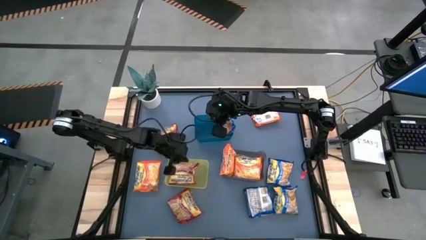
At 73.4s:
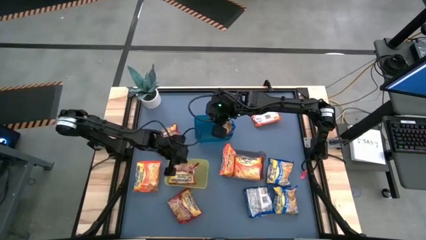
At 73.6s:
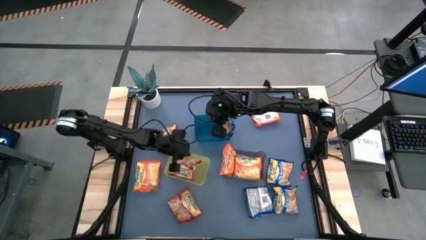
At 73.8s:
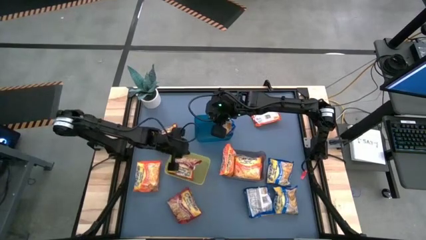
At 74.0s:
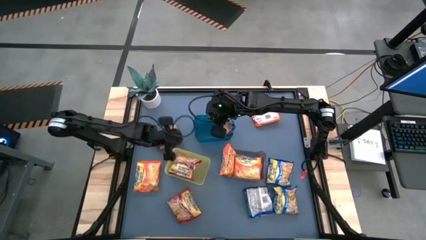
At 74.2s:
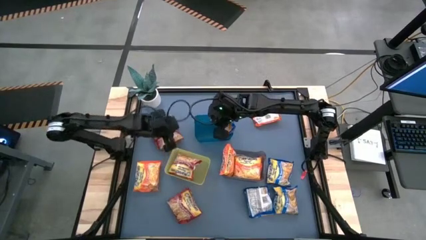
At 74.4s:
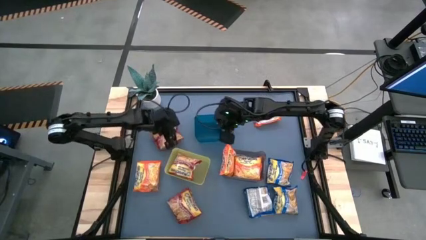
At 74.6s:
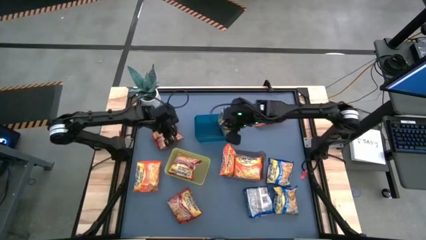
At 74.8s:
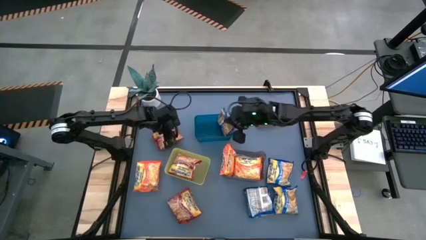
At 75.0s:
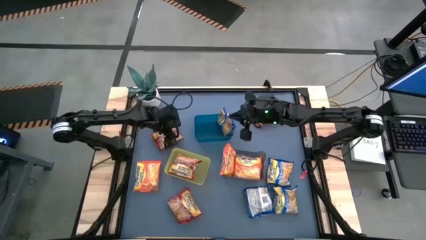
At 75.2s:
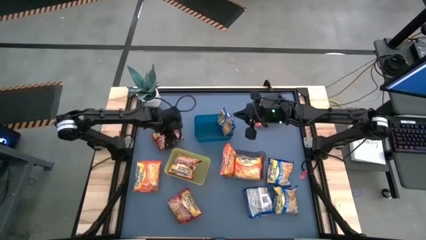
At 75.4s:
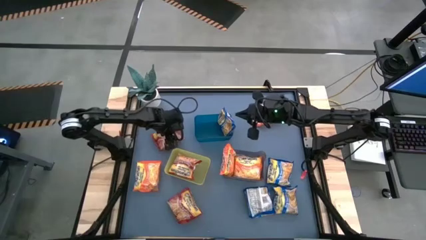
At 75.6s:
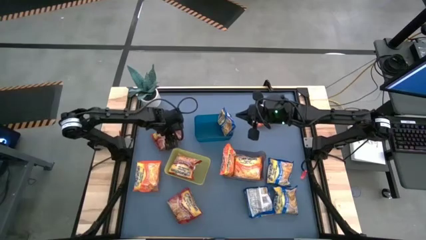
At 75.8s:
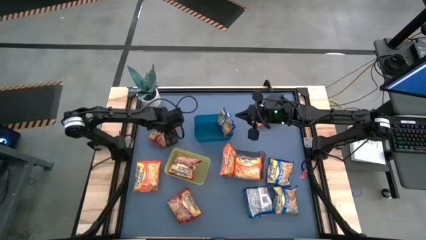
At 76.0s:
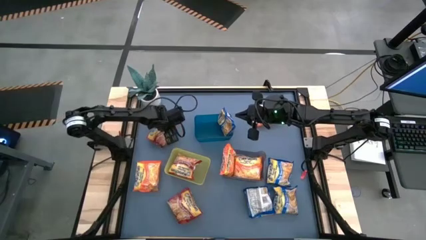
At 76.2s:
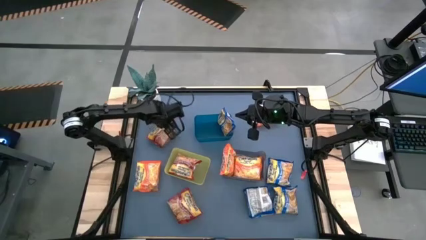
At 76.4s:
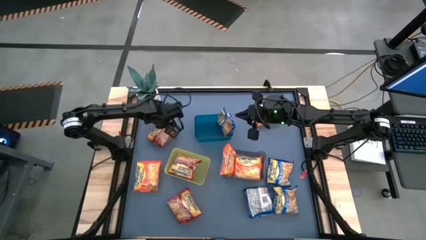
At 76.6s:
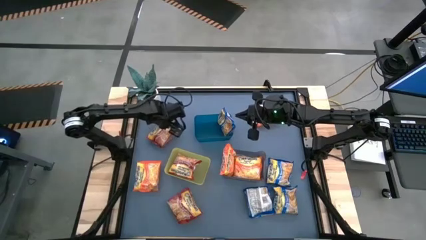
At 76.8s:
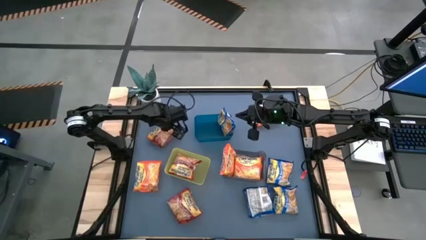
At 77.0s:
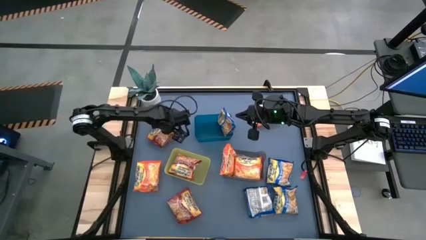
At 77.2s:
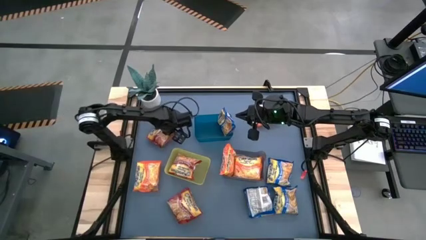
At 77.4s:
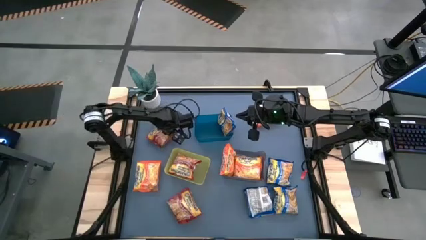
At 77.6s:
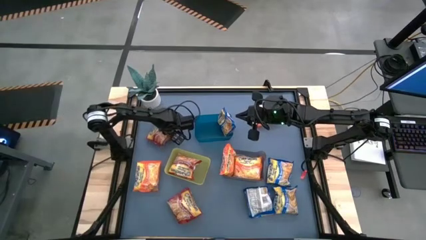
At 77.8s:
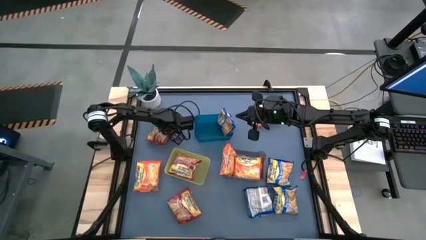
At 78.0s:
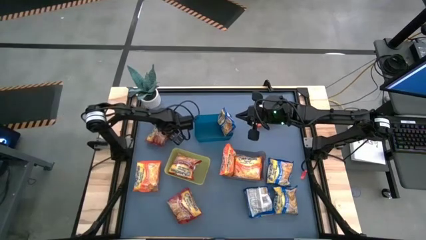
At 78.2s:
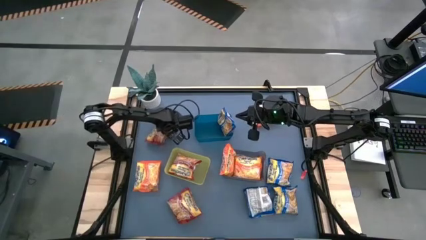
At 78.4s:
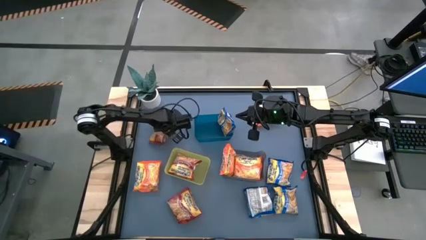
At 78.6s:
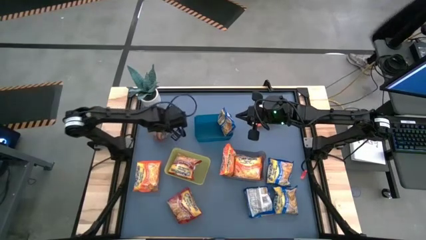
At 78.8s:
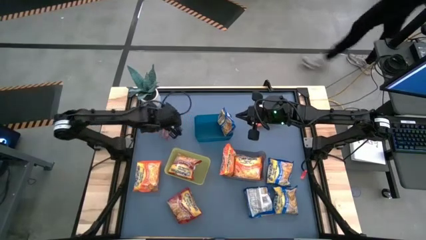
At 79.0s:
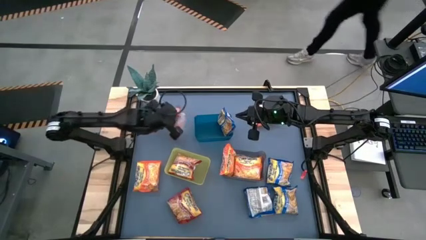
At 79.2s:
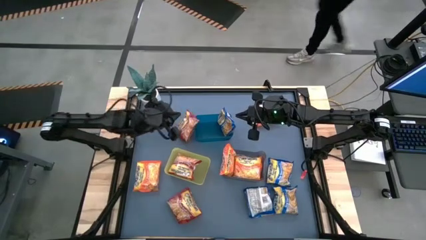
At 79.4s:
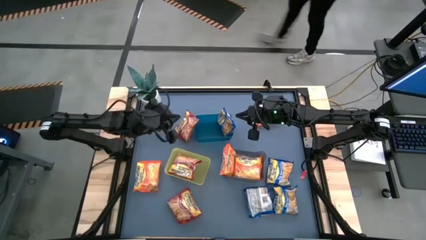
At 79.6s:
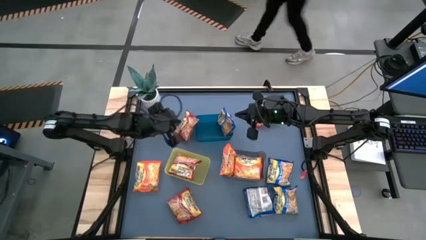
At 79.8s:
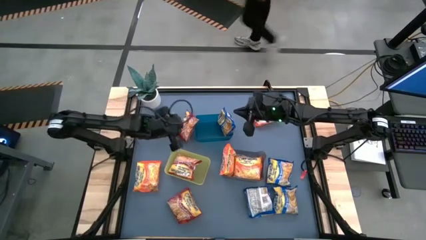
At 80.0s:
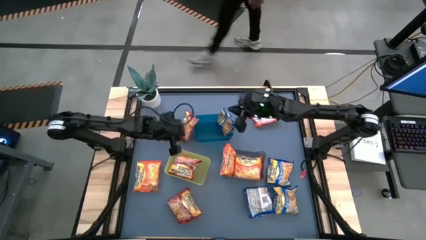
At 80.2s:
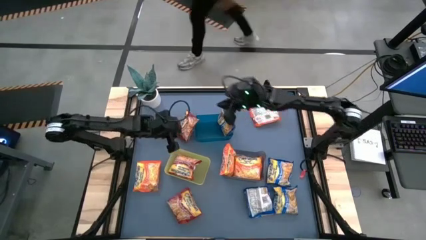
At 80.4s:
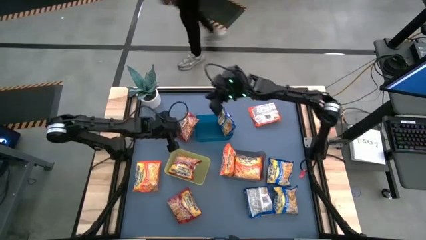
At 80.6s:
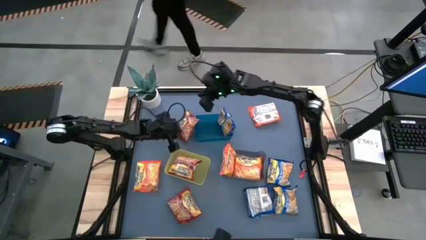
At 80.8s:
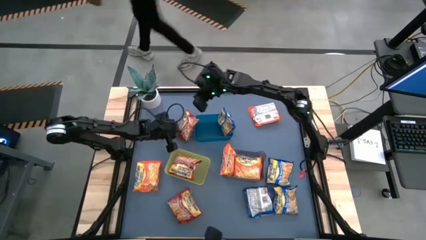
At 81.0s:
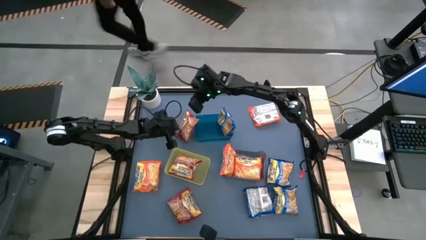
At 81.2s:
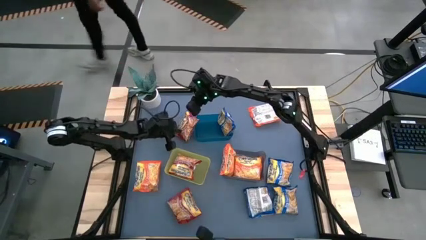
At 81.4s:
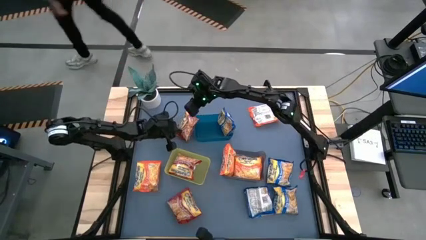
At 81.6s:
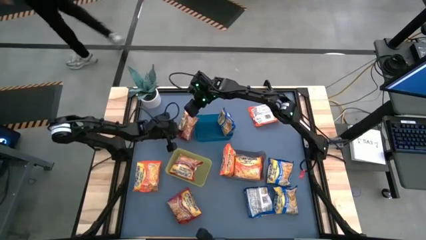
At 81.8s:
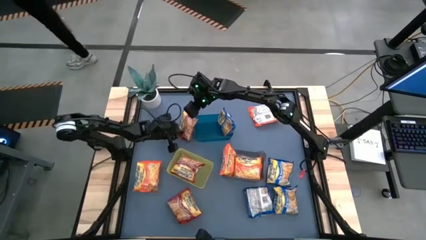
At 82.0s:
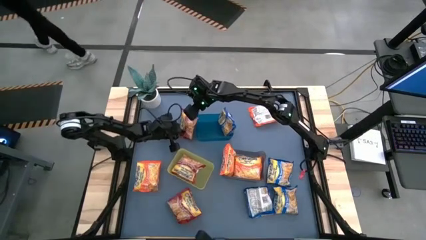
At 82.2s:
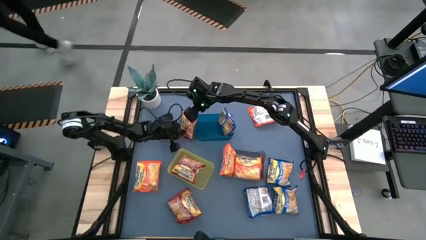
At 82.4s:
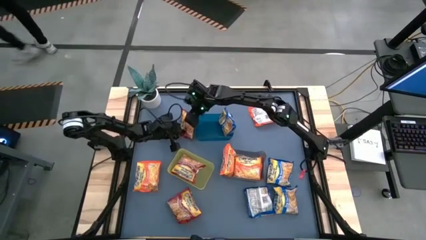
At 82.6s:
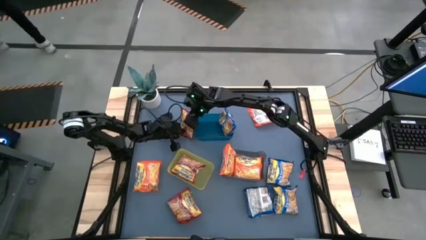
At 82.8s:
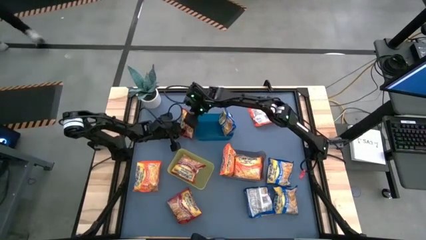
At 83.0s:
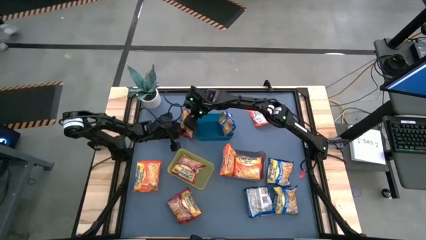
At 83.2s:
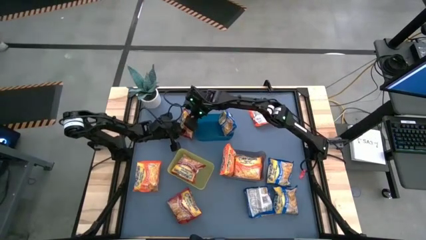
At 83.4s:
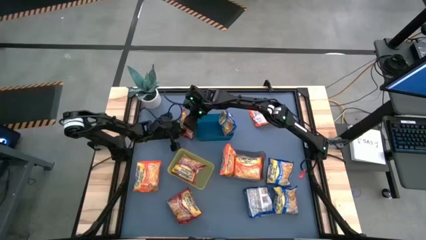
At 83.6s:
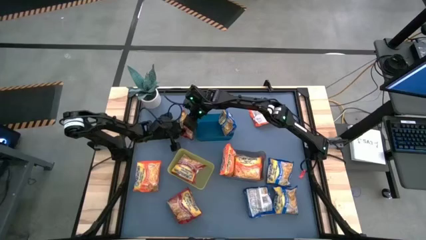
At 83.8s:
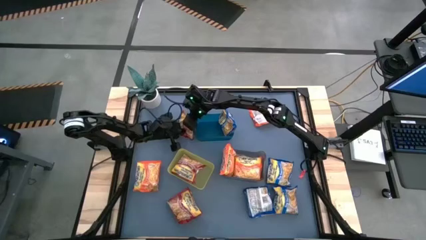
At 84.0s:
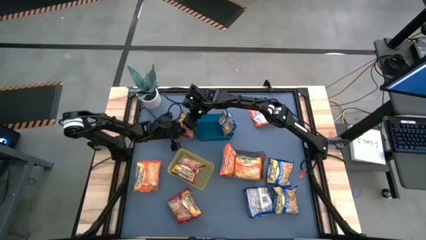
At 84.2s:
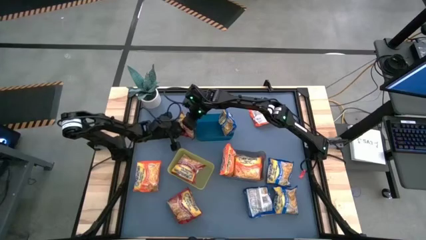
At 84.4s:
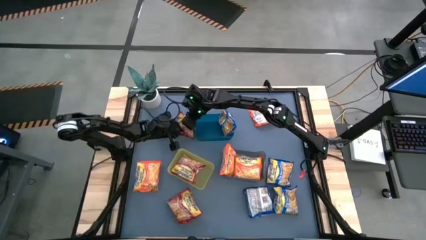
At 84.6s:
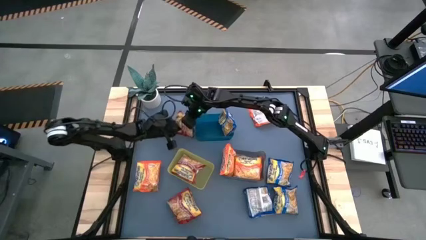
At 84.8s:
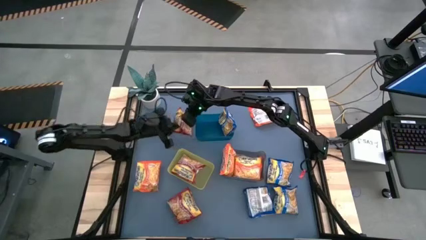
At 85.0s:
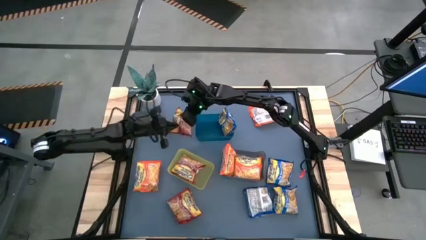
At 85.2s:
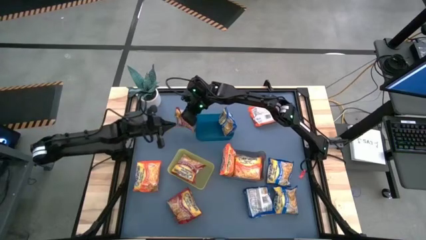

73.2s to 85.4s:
Task: Sort Maruchan noodles
Put the red noodle pack into the yellow bin
